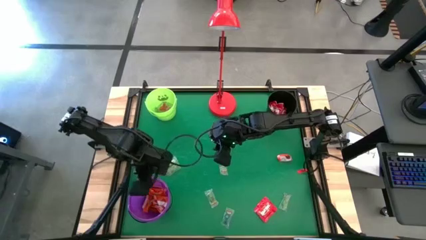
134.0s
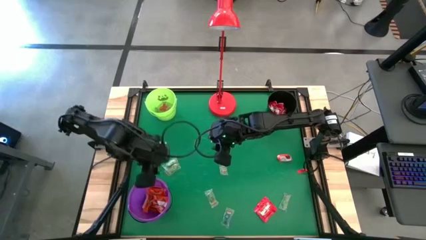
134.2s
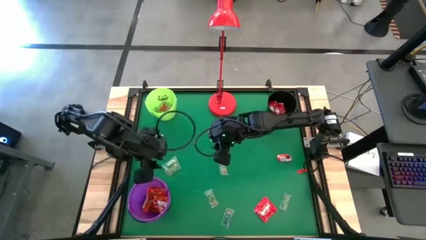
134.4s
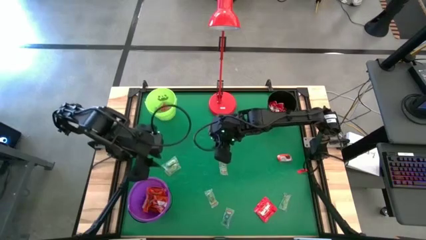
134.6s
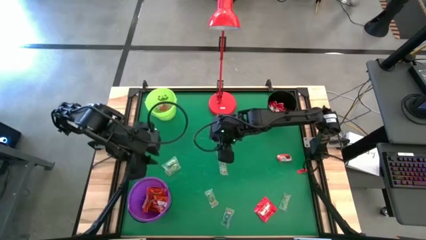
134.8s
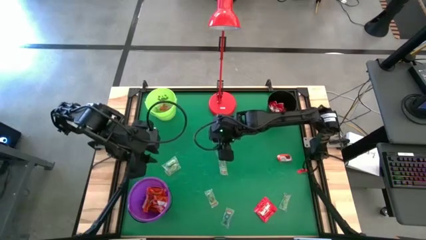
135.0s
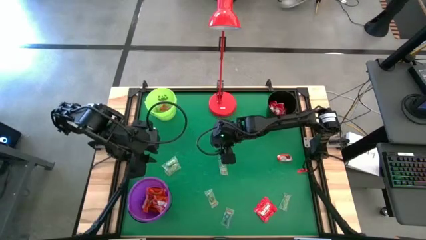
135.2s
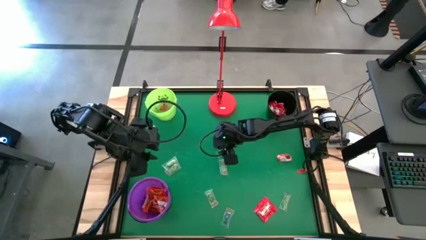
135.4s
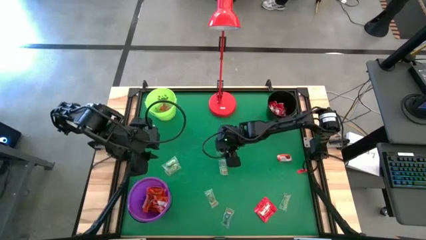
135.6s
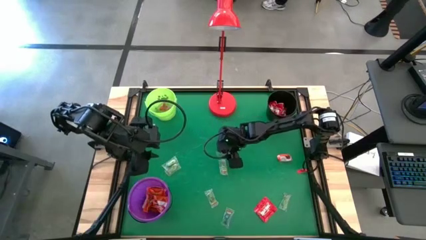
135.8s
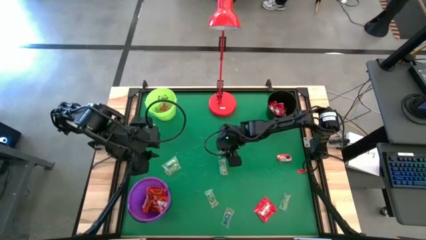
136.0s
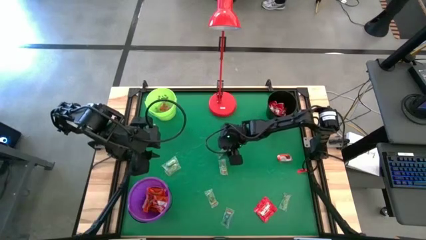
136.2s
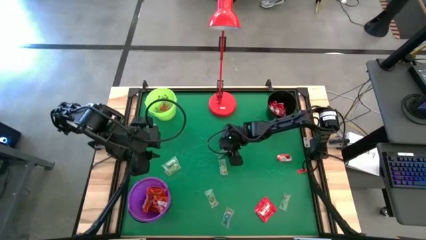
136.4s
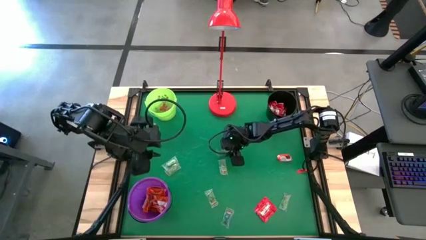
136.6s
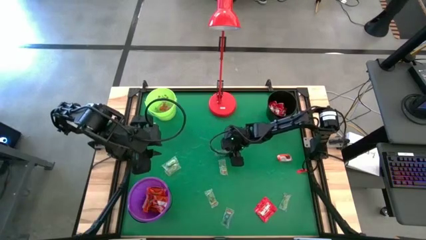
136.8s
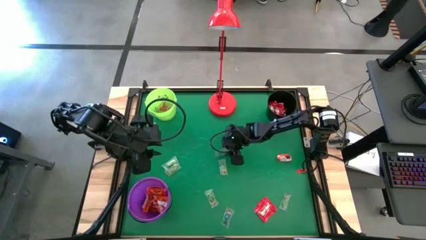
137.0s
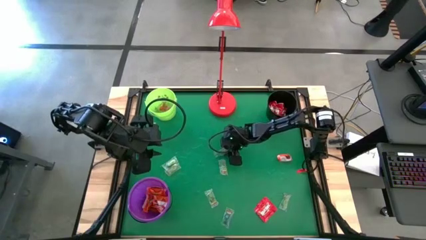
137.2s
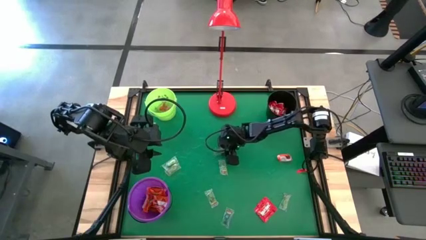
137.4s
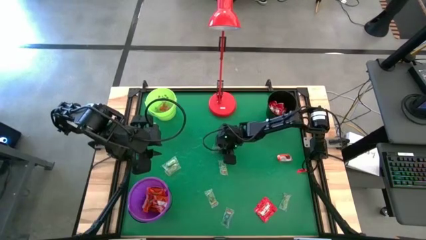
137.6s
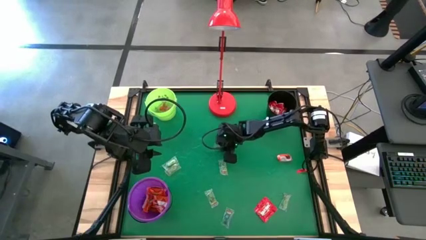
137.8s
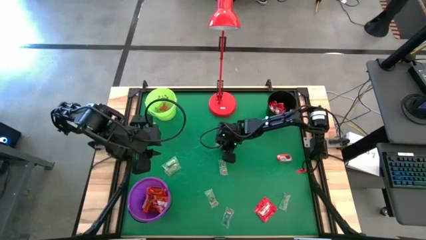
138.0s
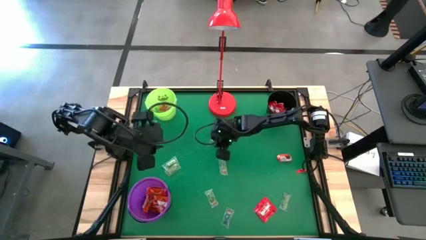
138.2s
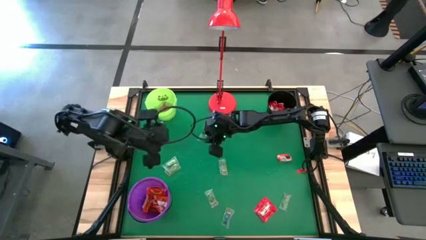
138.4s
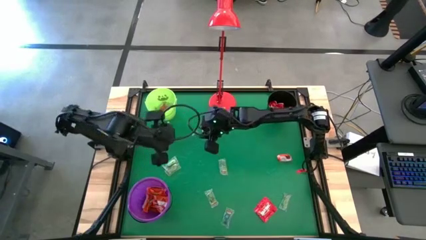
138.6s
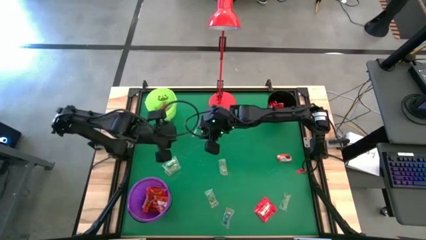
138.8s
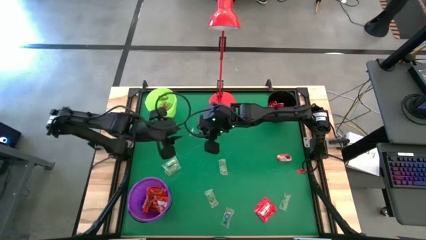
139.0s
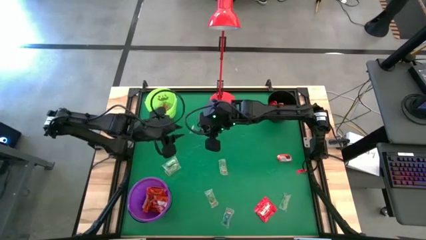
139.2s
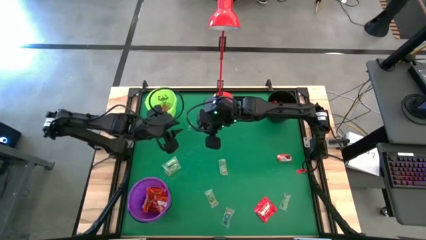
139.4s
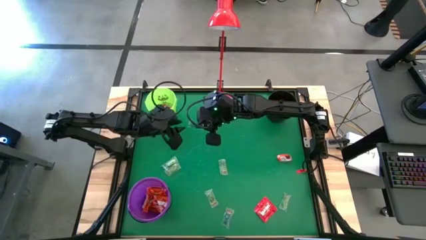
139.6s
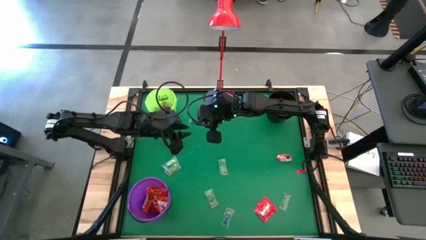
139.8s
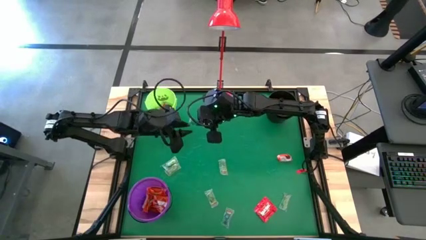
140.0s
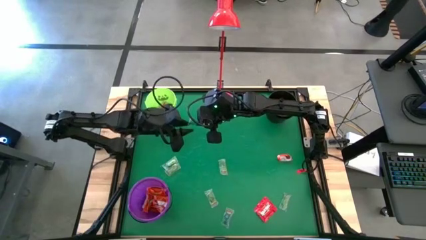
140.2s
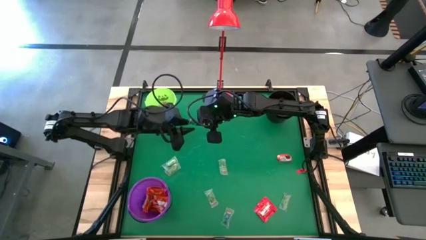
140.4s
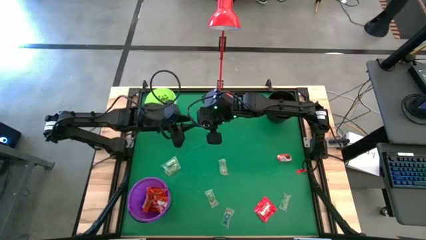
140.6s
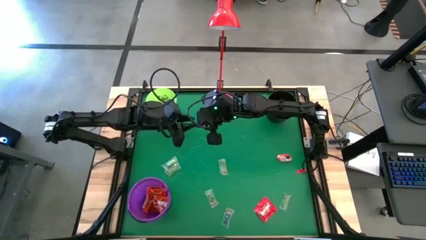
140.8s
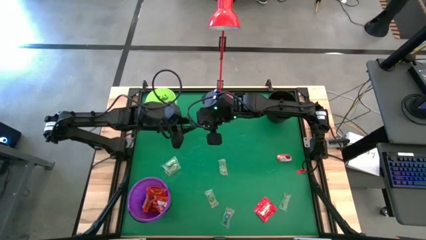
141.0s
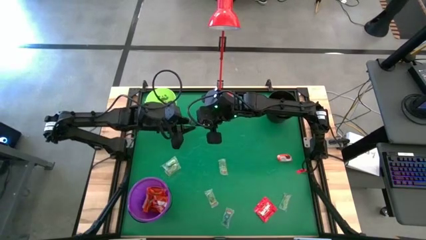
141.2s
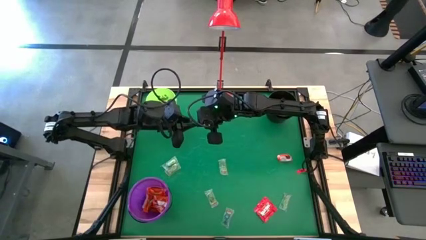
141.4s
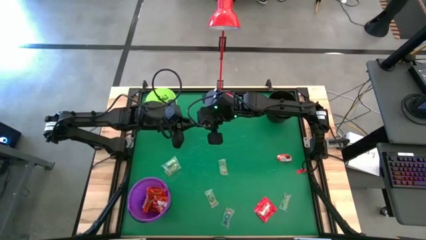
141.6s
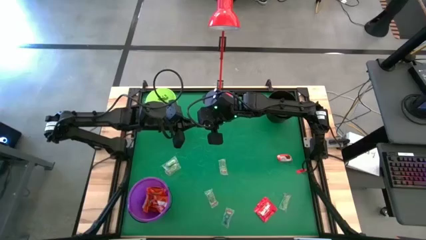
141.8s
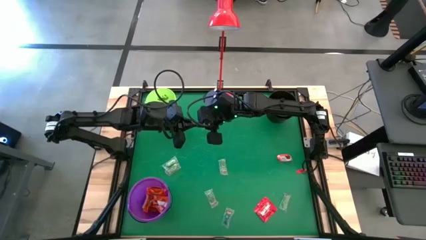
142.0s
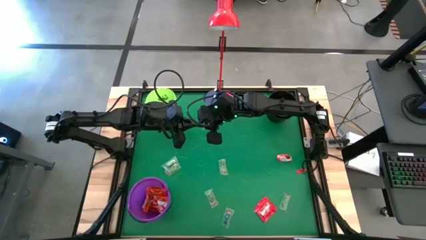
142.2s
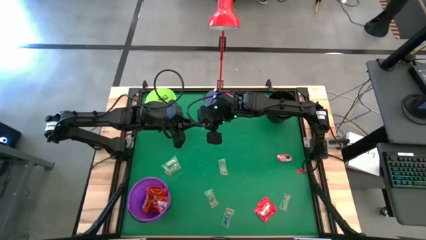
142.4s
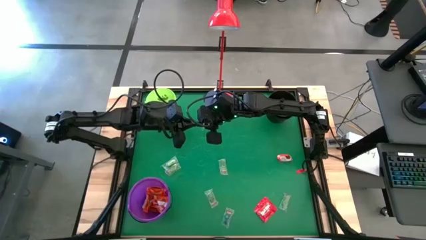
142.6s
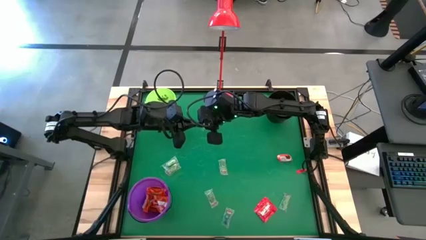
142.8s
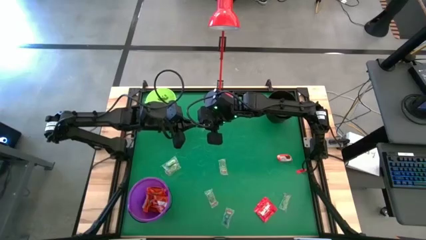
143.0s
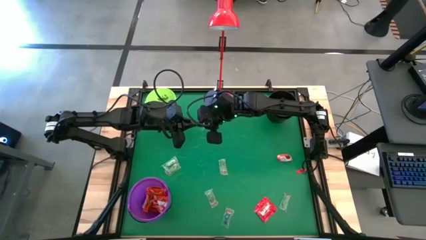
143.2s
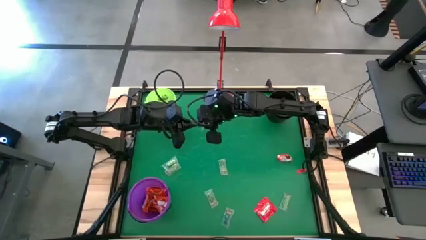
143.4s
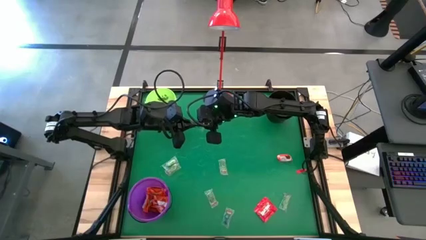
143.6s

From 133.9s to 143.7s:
Task: Sort candy
Put the transparent candy into the green bucket

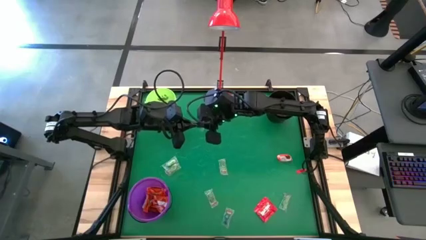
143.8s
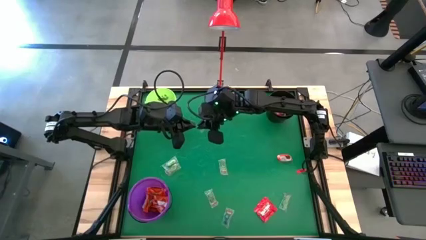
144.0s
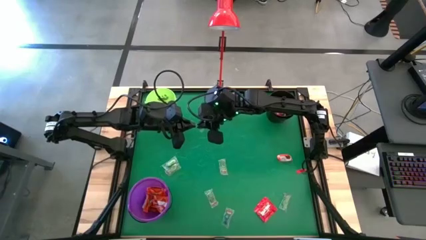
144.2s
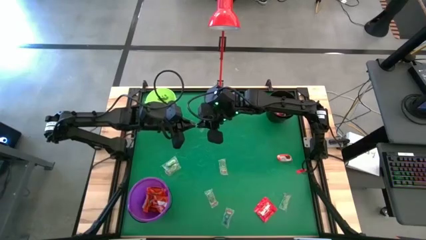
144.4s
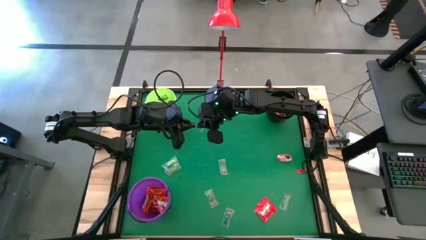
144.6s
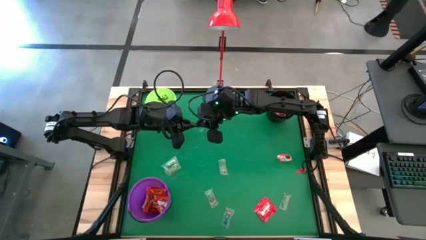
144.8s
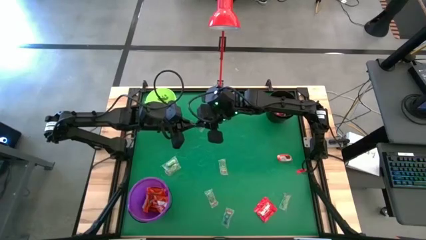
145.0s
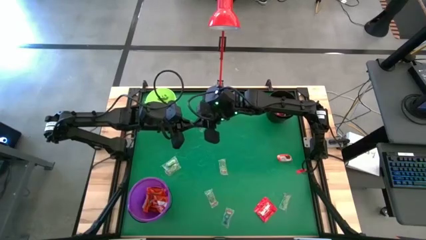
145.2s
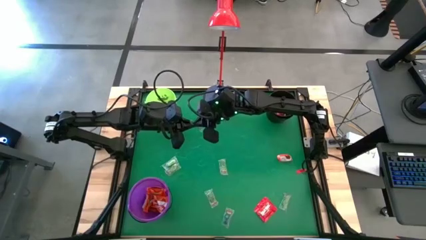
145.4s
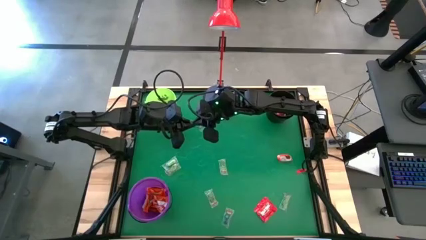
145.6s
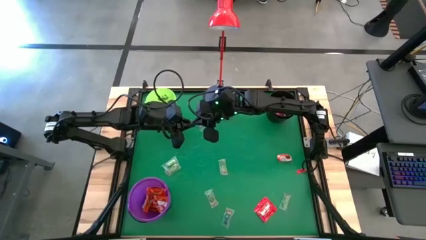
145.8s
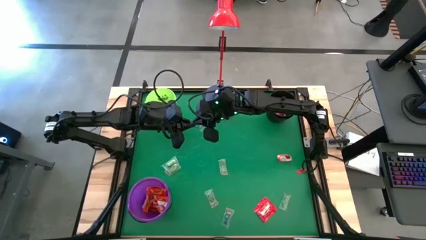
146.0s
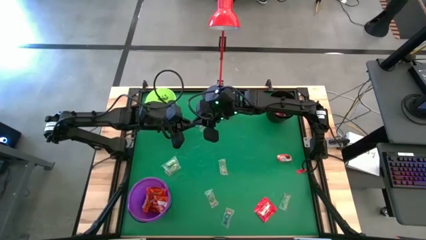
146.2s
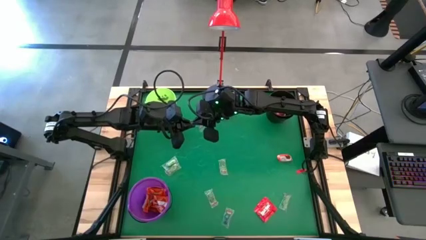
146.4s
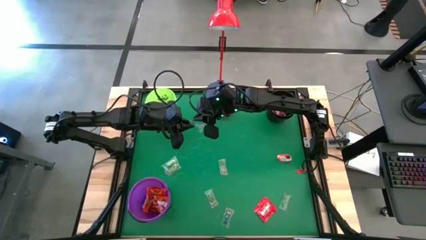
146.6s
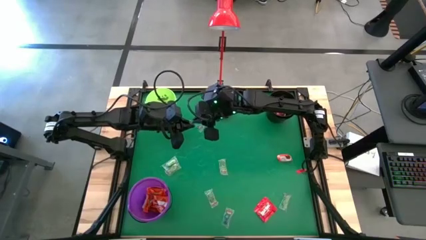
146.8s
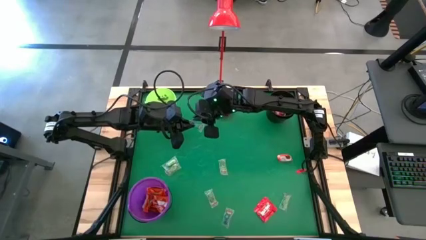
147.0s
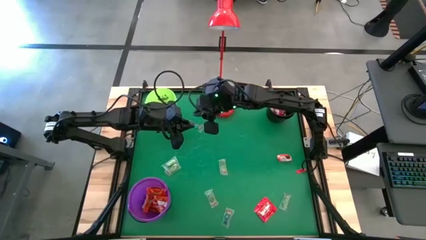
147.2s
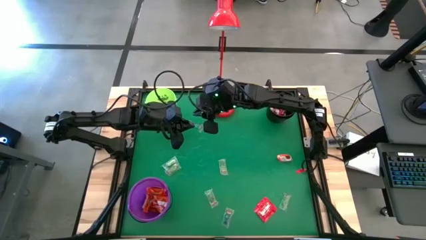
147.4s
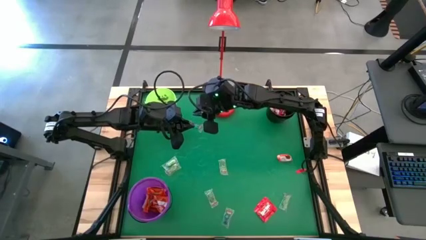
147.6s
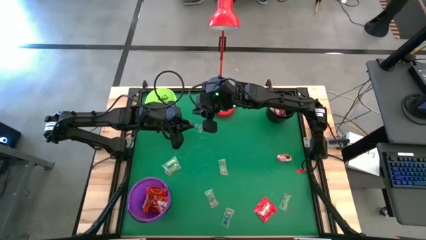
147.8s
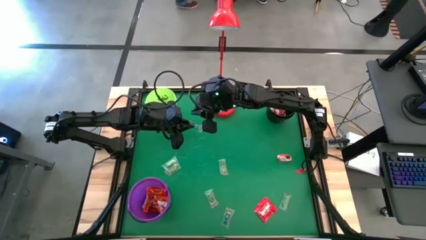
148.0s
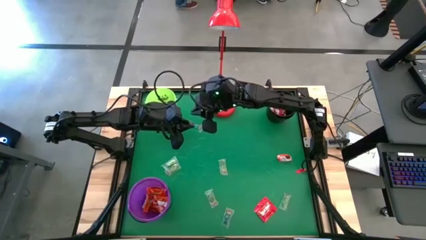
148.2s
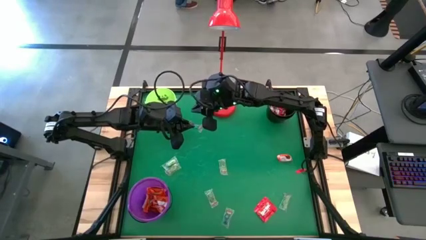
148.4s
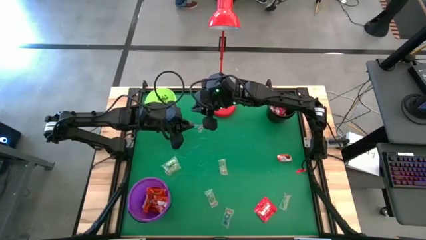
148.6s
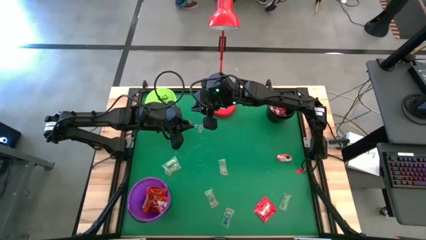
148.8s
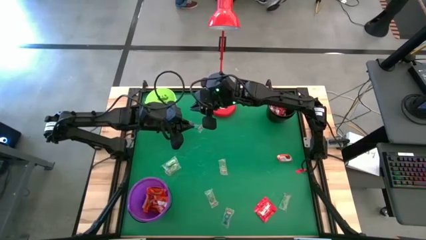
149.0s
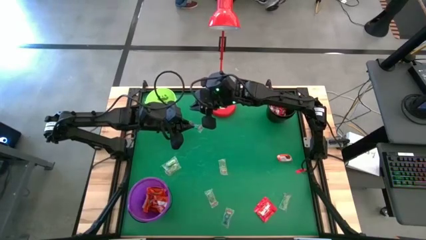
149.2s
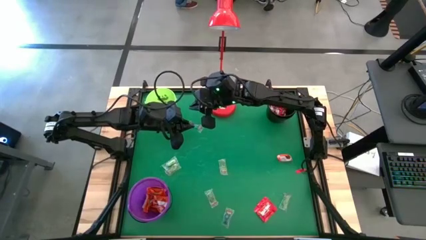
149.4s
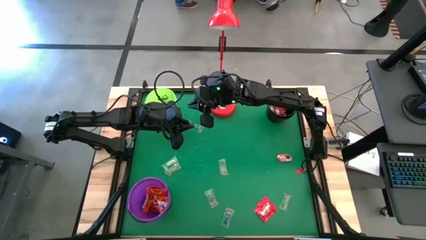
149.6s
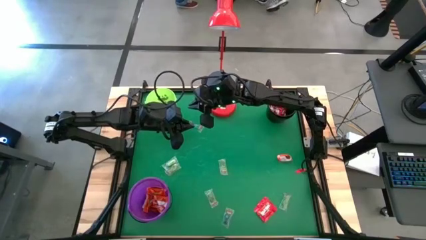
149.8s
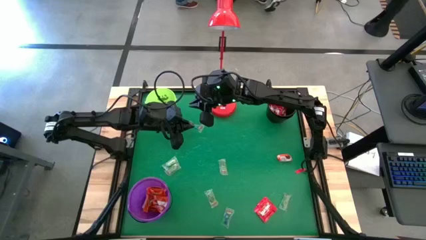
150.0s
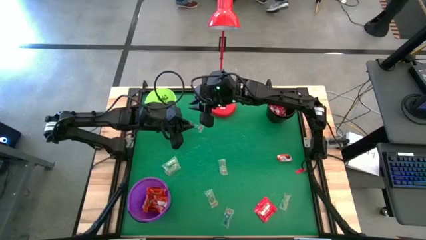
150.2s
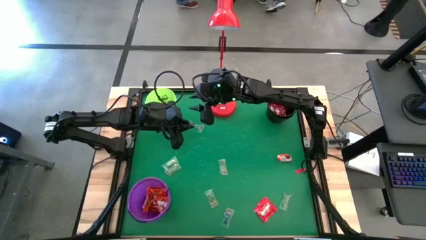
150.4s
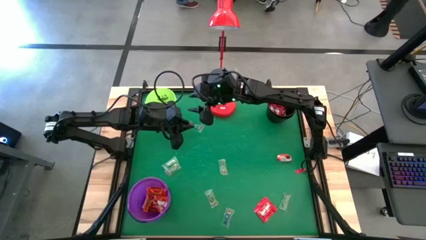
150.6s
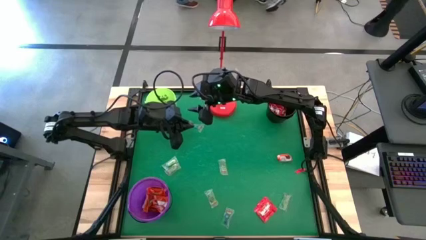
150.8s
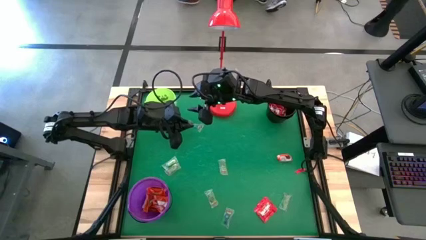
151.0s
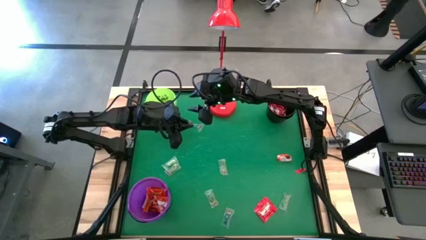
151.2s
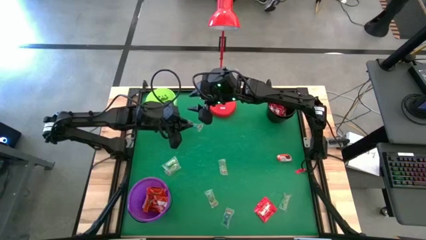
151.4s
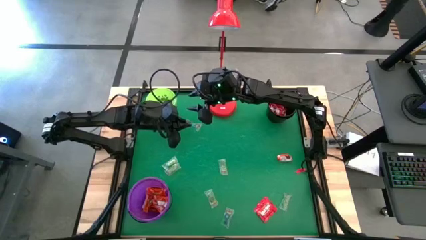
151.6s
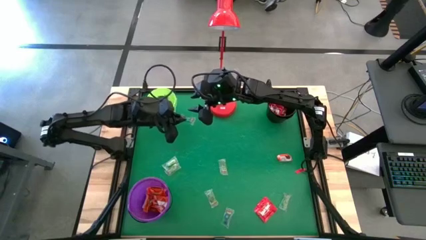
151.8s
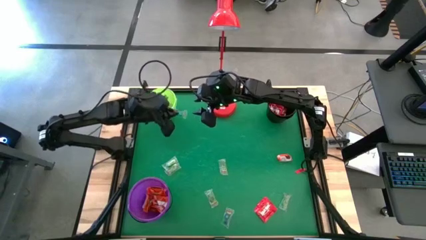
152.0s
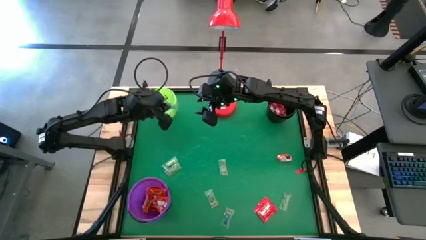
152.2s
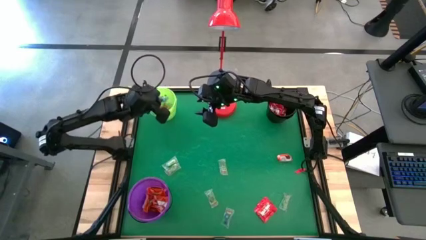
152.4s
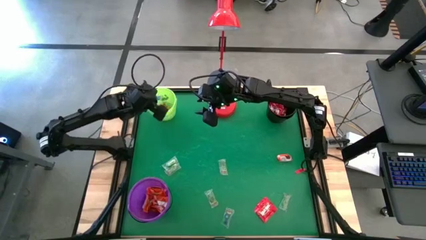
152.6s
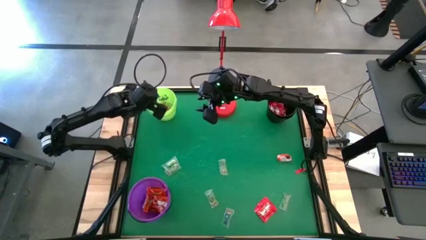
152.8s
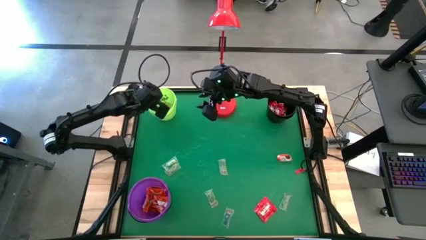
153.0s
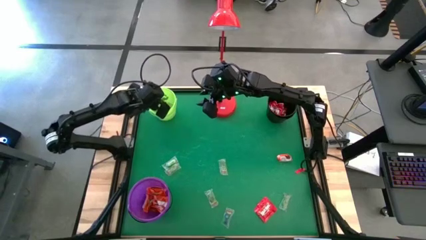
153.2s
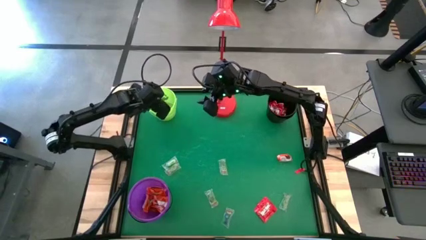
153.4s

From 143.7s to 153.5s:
Put the transparent candy into the green bucket
